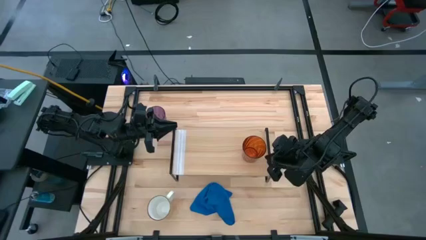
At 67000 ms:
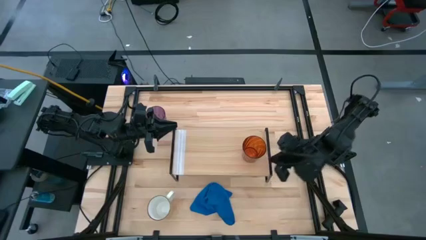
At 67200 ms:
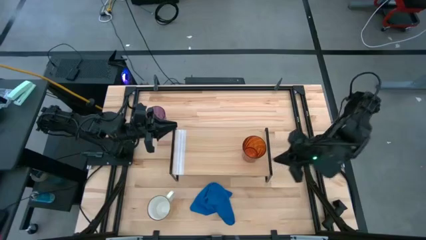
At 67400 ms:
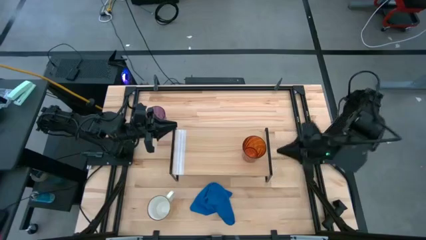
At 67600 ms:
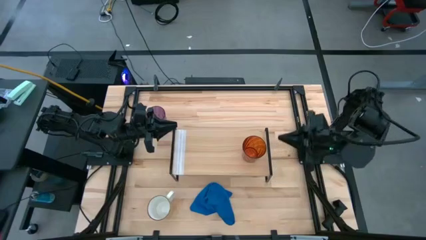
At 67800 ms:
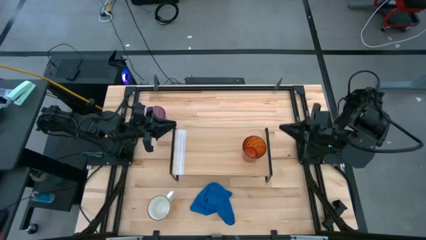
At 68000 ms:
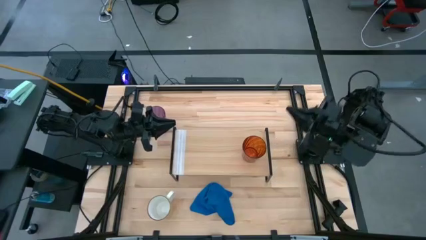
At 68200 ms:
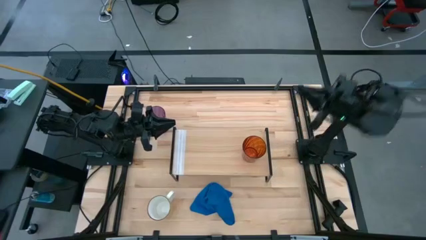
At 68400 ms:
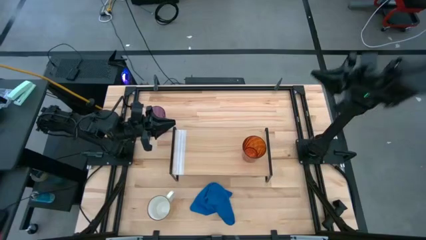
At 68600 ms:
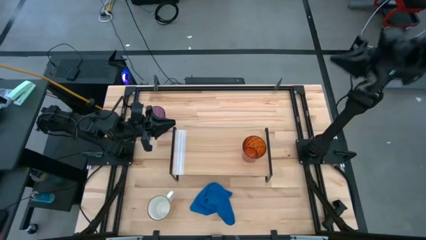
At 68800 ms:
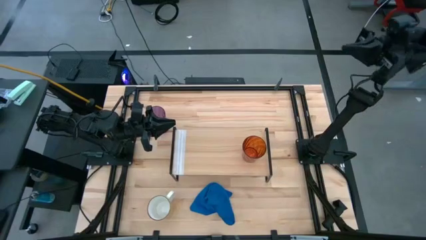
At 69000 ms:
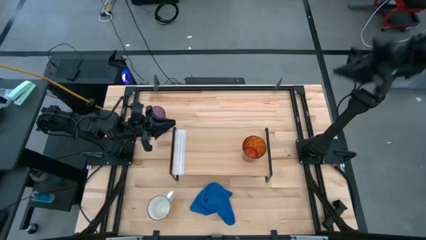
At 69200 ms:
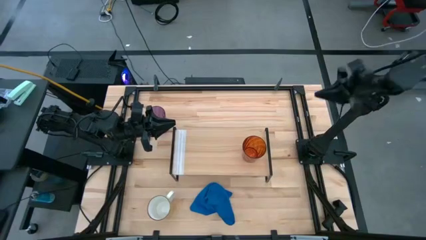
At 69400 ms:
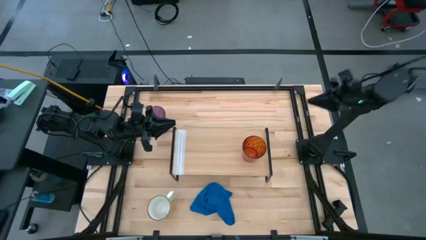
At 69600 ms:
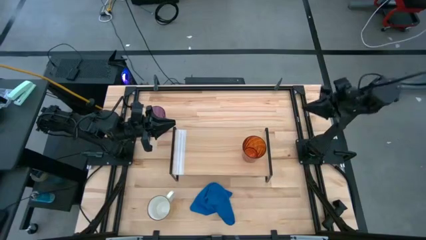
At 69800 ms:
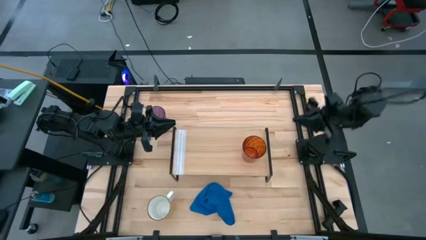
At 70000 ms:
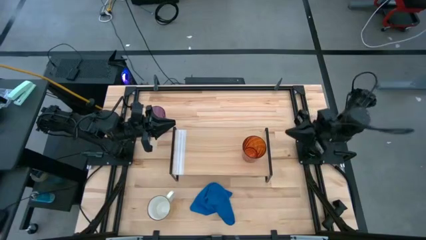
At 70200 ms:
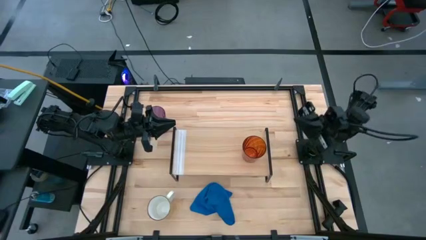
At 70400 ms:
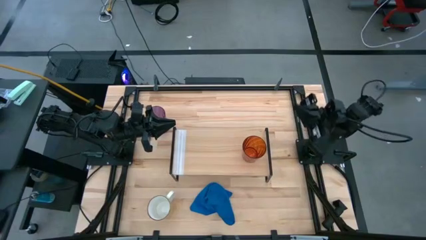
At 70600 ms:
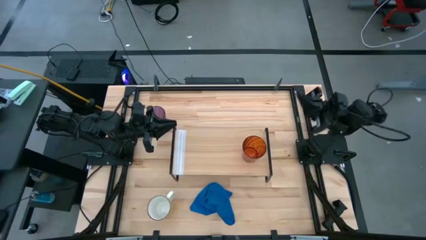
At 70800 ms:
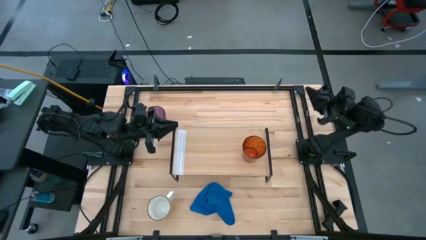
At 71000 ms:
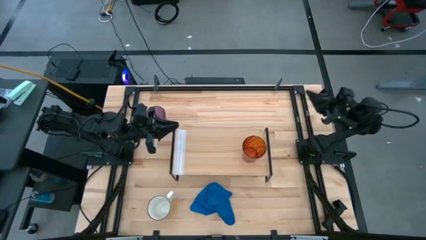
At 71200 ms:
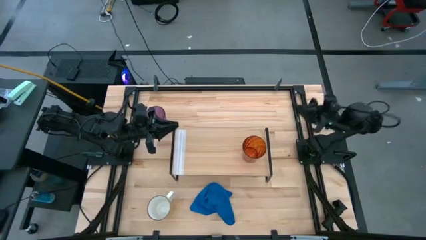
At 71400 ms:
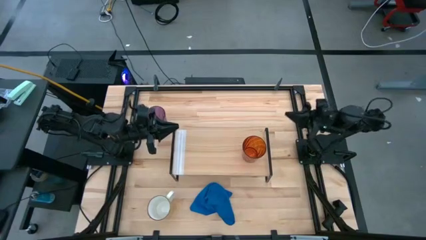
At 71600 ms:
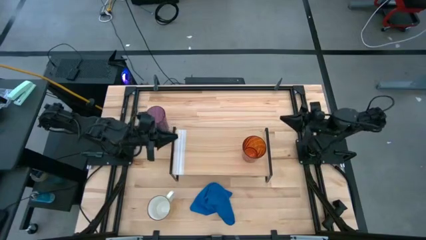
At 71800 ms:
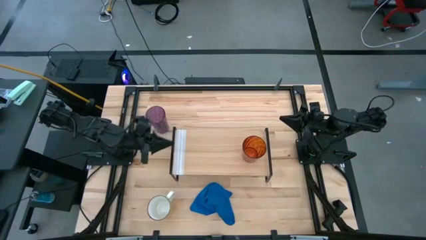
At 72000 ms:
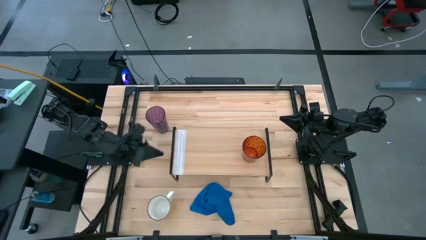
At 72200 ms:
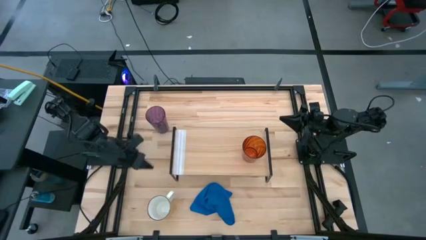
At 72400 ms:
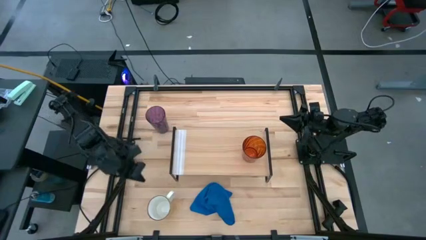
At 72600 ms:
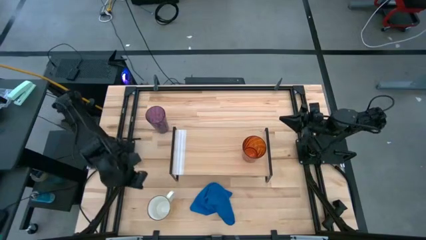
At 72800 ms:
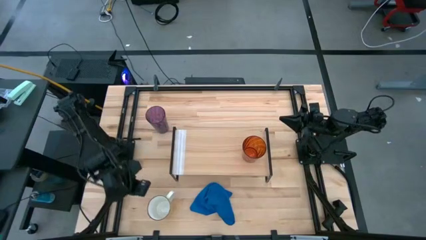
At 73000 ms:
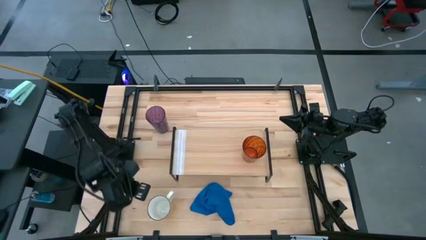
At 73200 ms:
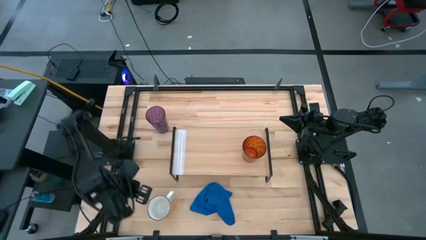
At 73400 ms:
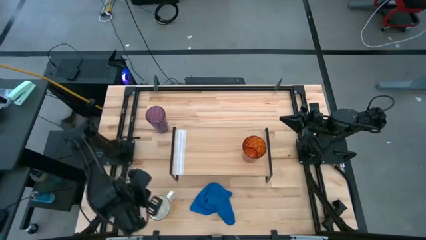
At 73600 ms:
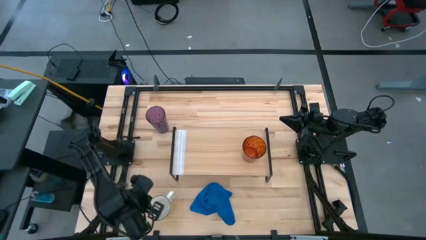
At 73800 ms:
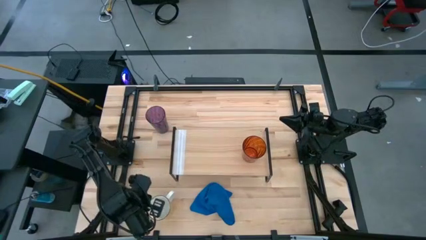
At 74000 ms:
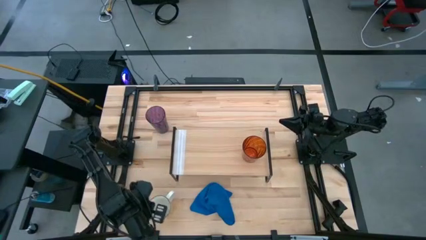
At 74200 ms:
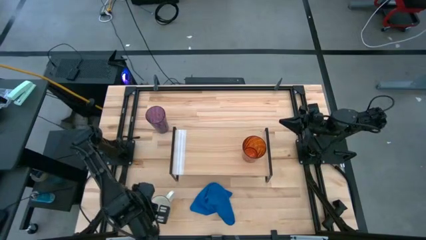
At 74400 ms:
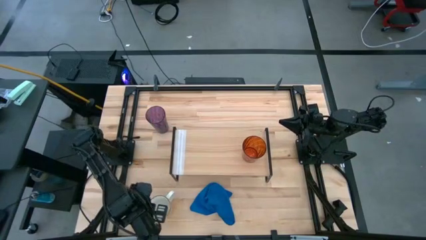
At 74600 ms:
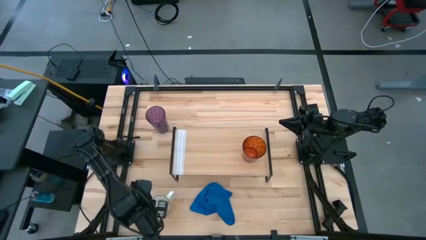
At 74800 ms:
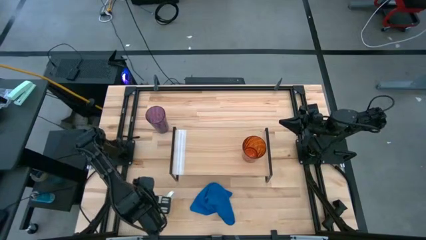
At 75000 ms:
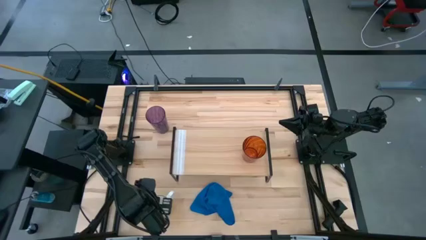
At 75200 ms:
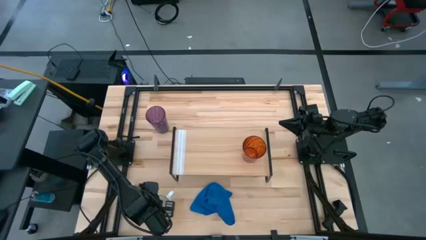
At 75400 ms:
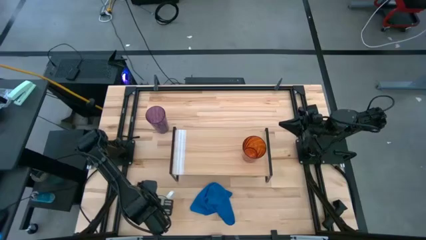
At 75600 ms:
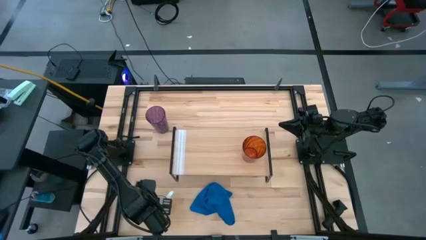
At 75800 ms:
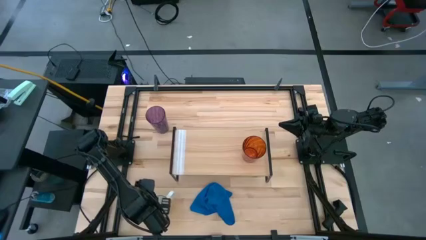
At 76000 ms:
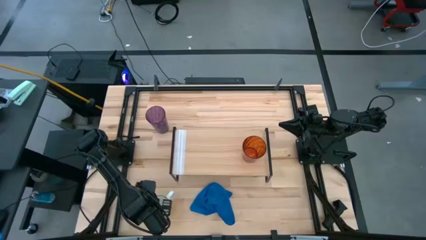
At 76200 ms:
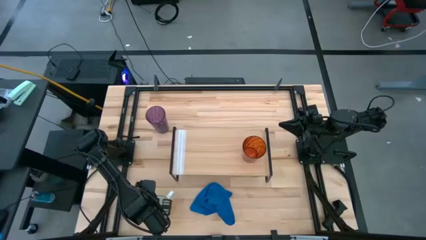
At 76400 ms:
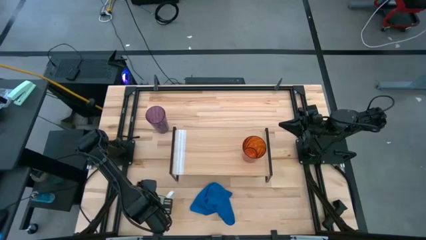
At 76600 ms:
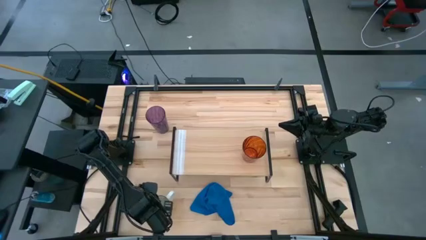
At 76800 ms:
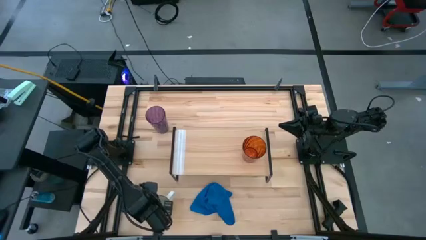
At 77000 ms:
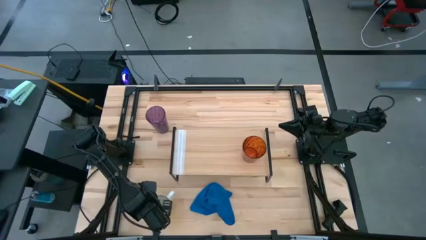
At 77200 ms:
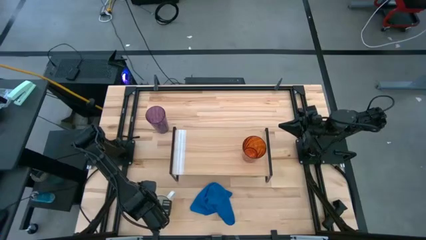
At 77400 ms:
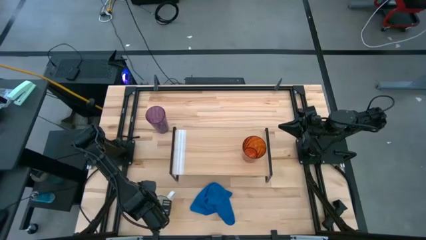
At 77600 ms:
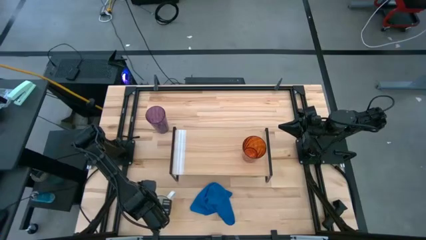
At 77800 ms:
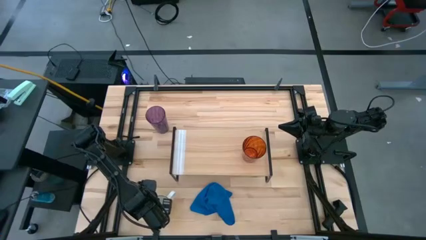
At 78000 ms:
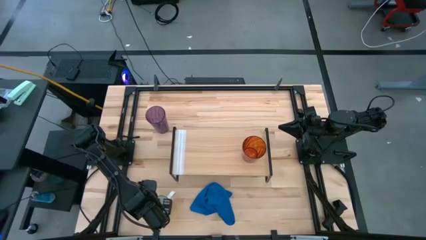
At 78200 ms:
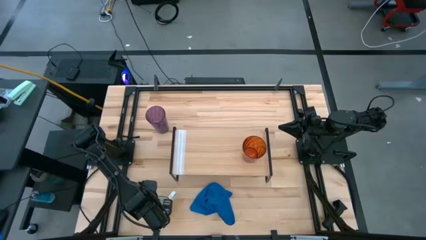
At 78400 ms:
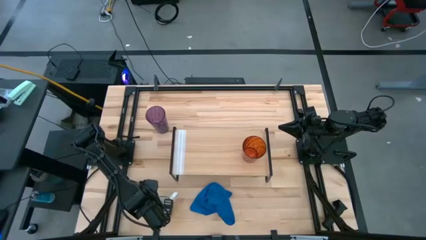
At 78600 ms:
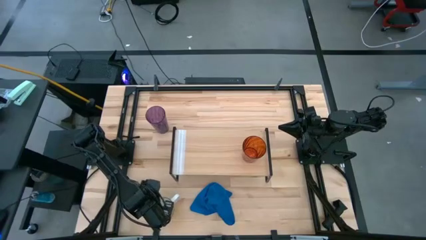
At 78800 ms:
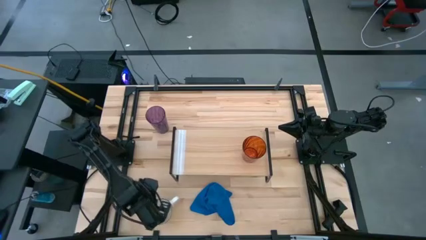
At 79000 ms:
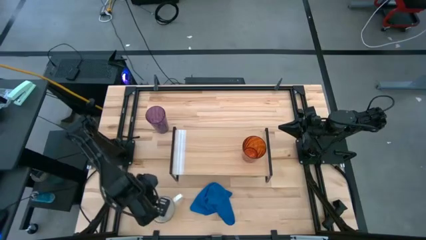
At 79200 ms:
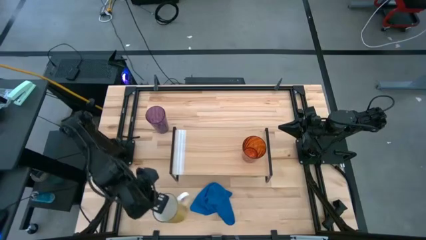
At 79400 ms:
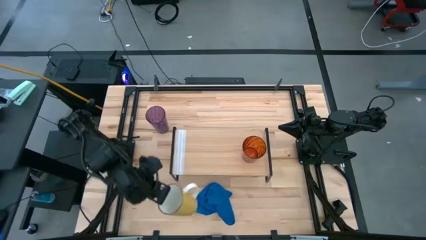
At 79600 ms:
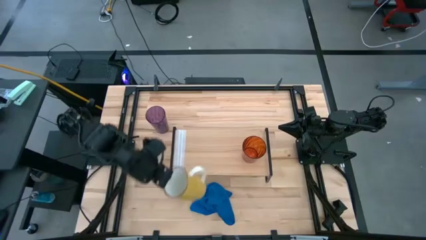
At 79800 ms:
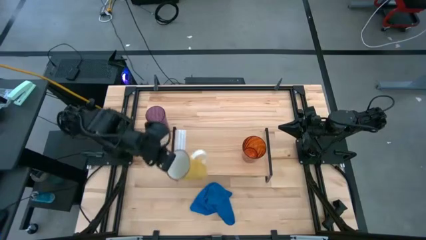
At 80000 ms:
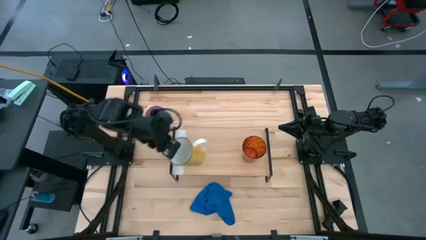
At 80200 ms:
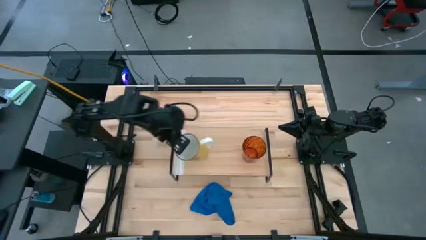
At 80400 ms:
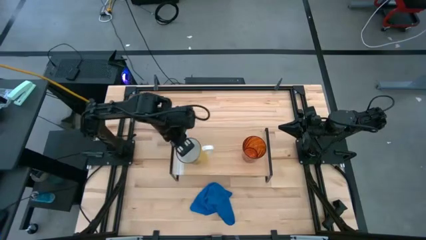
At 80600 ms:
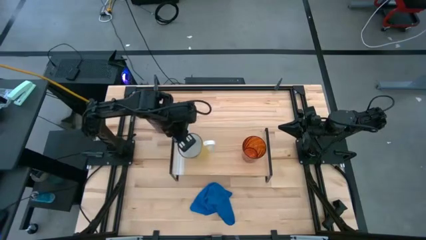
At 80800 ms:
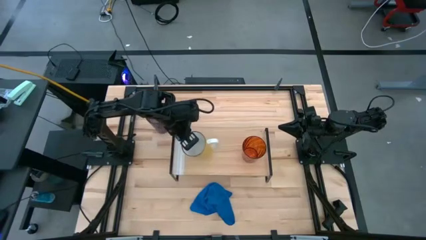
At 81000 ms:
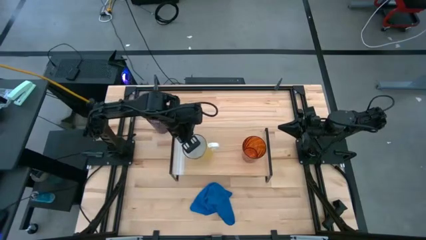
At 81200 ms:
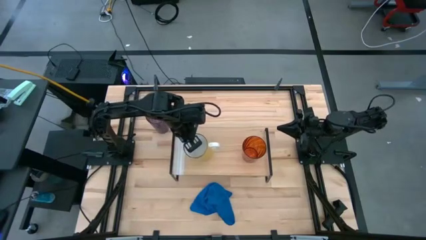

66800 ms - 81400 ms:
Task: Stack small to large cups/mugs on shelf
Put the yellow mug on the shelf
